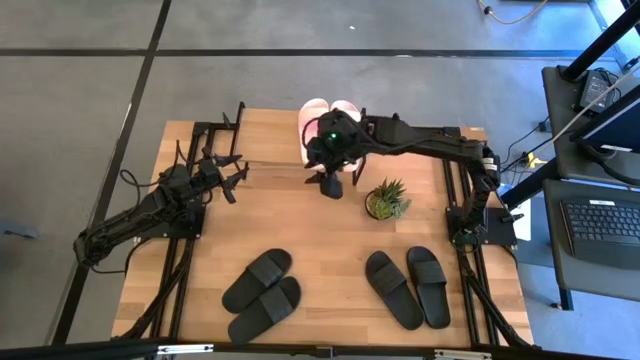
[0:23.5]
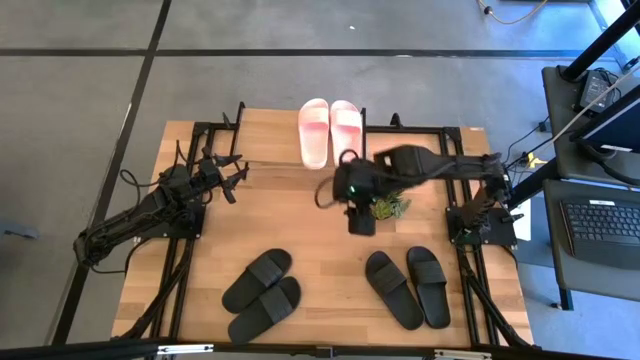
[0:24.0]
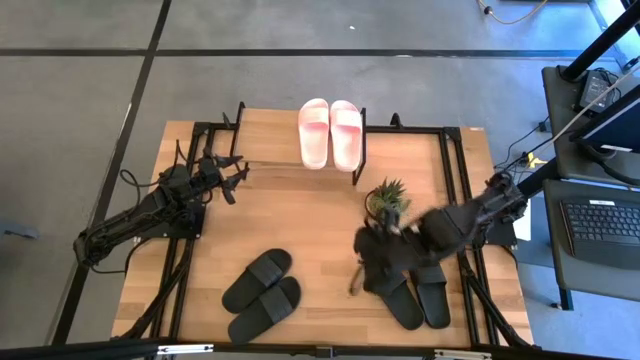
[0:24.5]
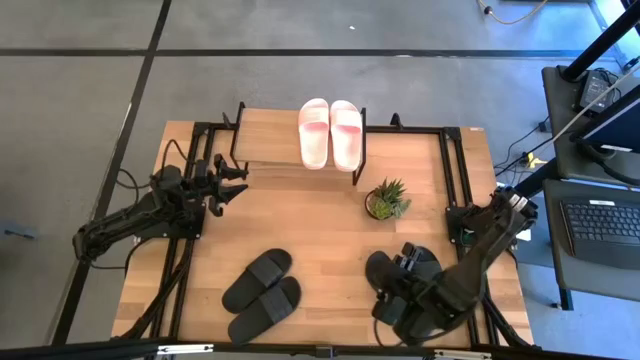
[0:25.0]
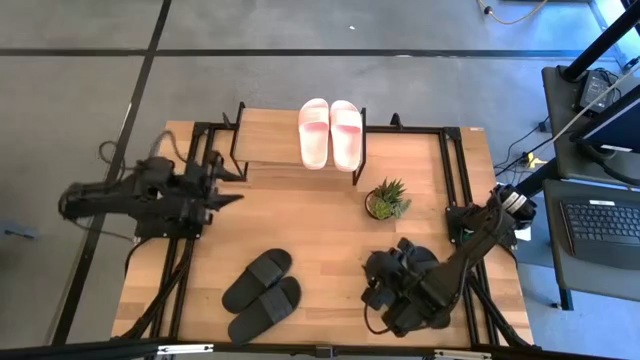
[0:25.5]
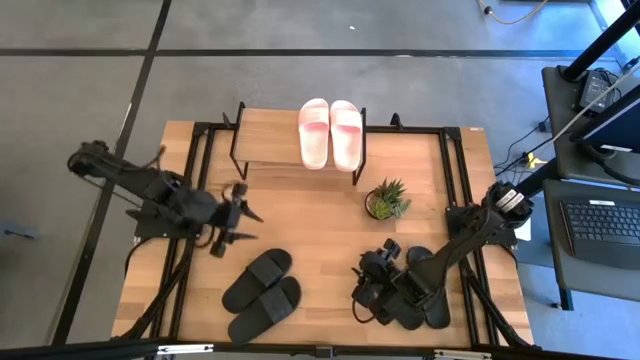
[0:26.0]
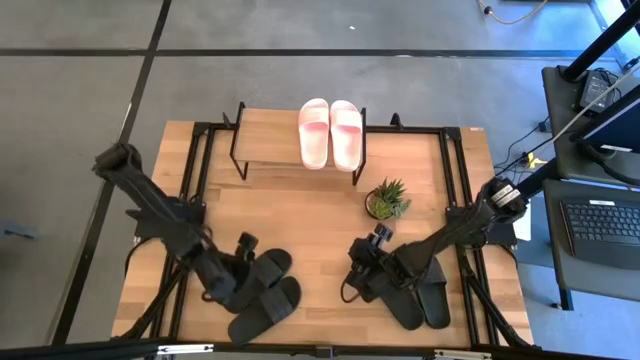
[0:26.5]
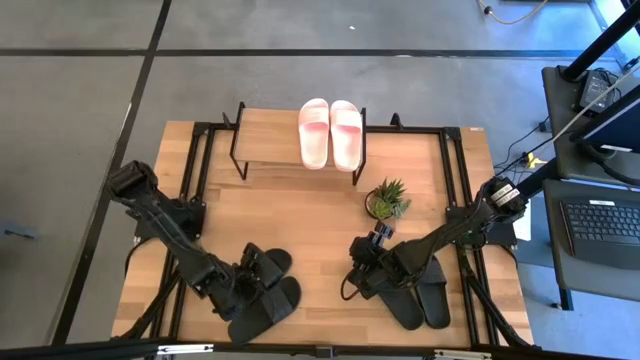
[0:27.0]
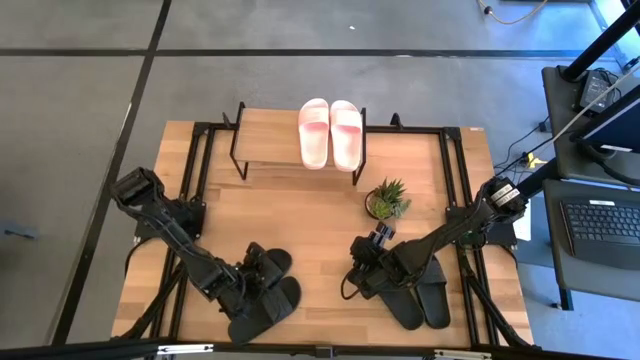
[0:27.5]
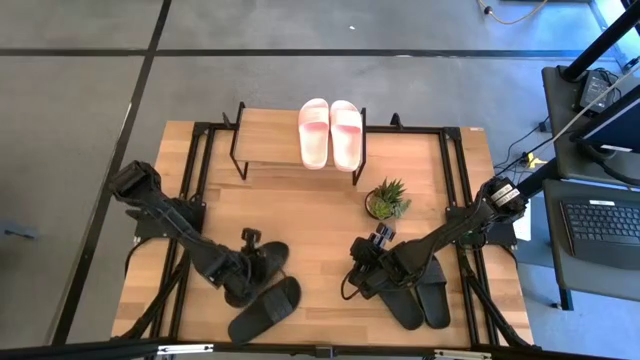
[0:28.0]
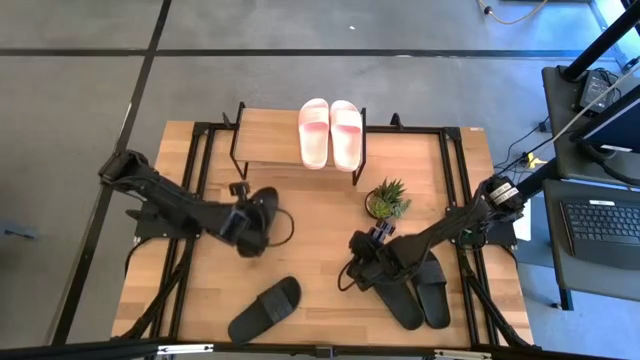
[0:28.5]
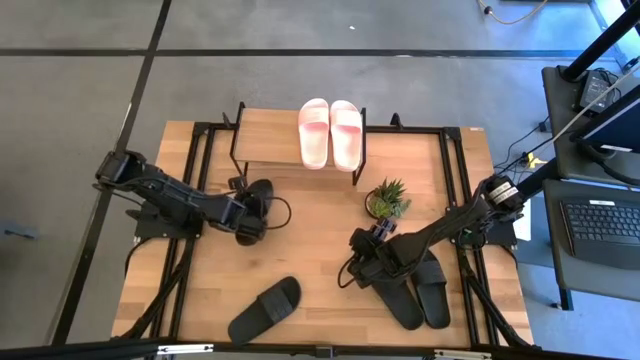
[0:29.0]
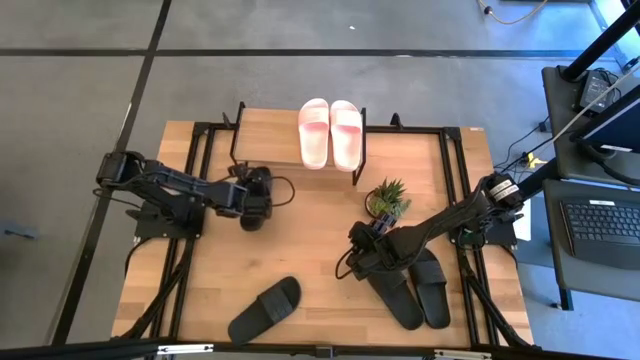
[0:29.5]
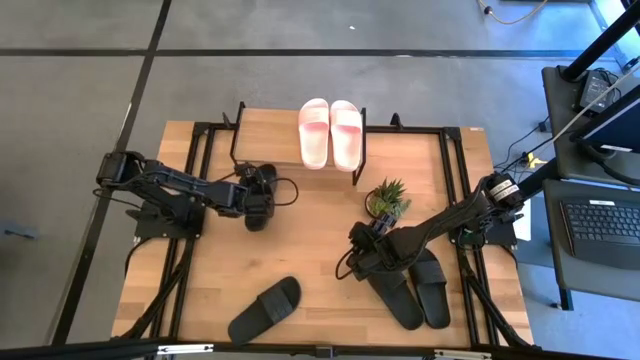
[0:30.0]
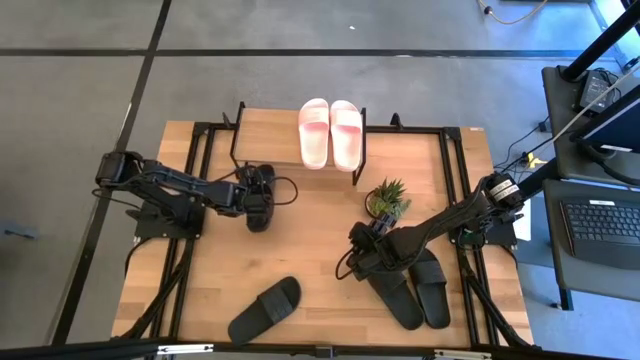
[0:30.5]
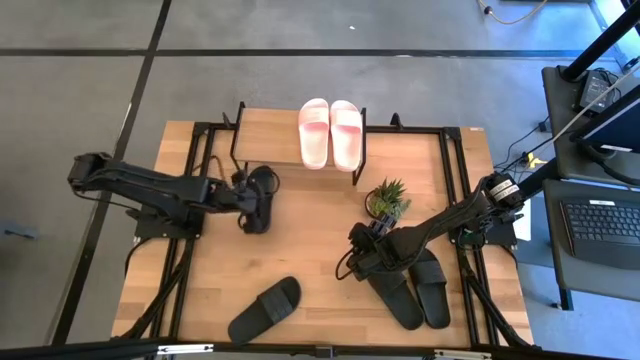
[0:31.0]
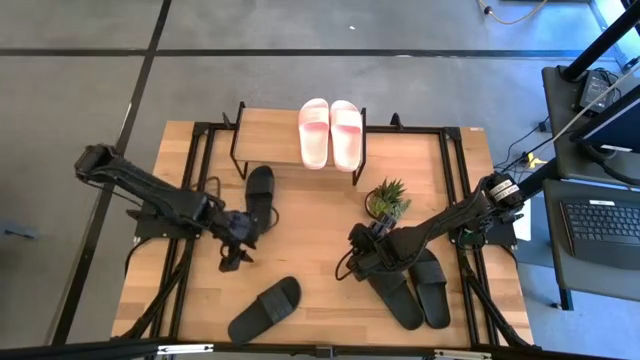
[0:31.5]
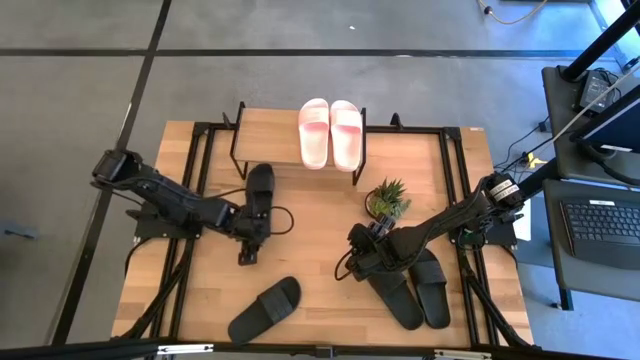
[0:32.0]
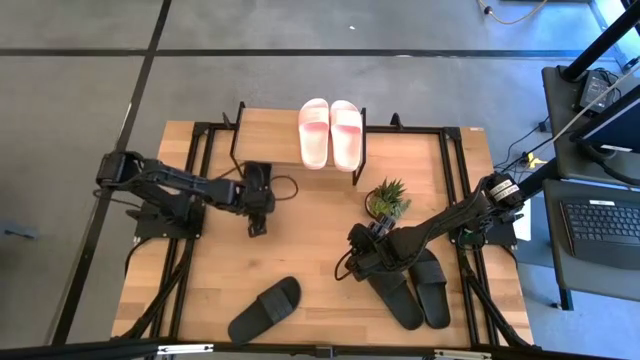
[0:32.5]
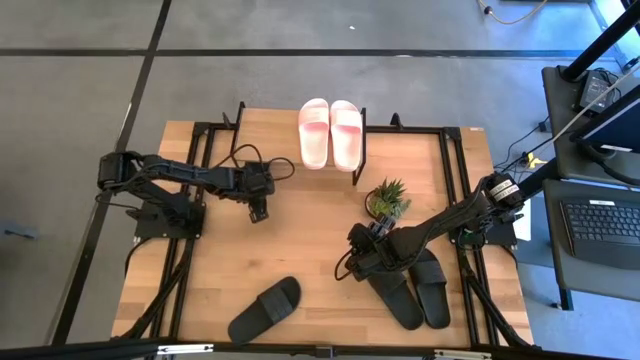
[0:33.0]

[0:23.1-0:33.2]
Task: Pick and place slides into the shelf
Put the black slide under the shelf

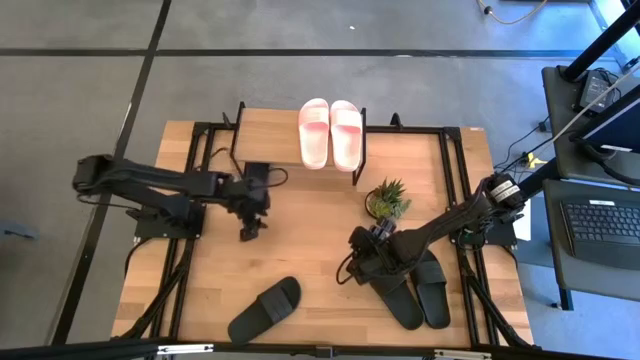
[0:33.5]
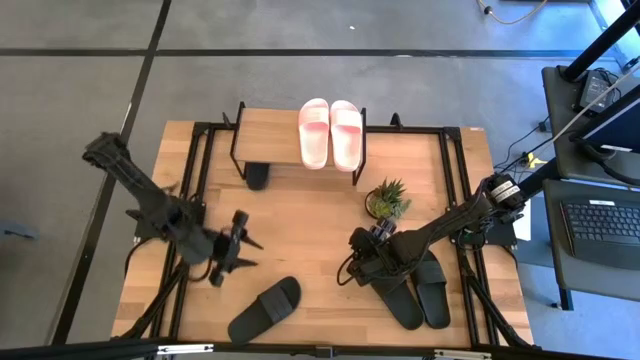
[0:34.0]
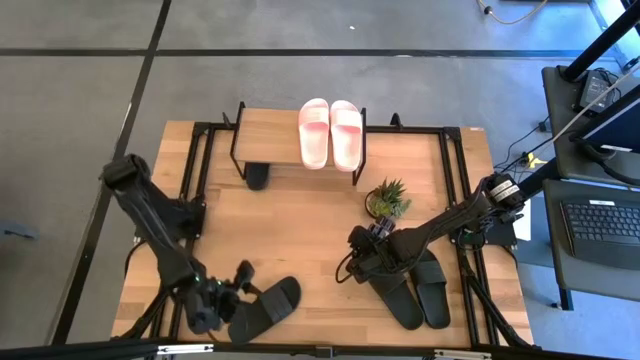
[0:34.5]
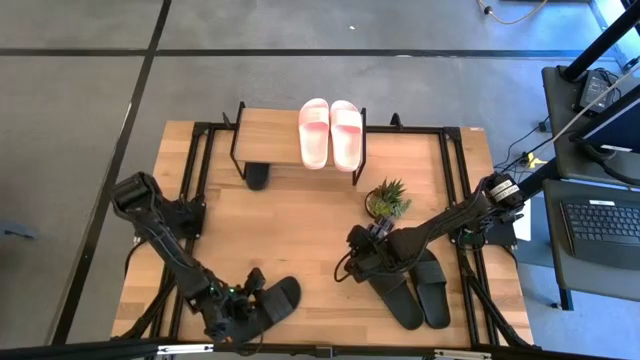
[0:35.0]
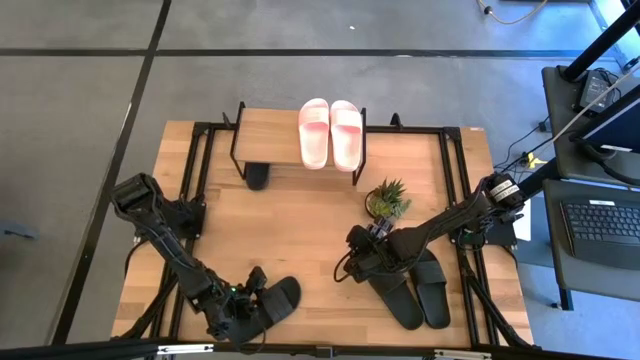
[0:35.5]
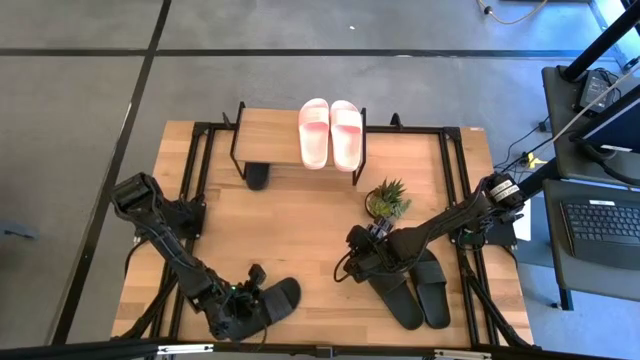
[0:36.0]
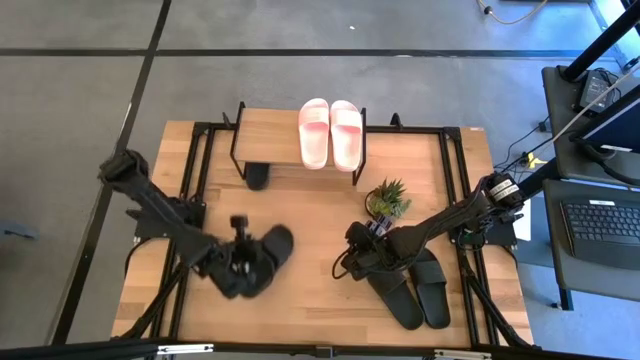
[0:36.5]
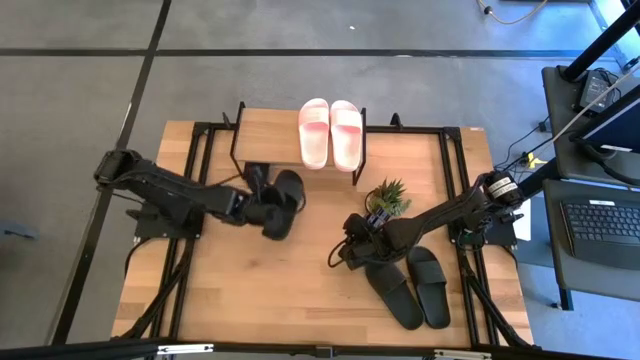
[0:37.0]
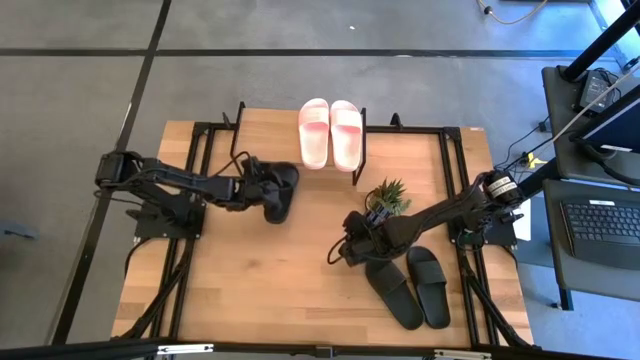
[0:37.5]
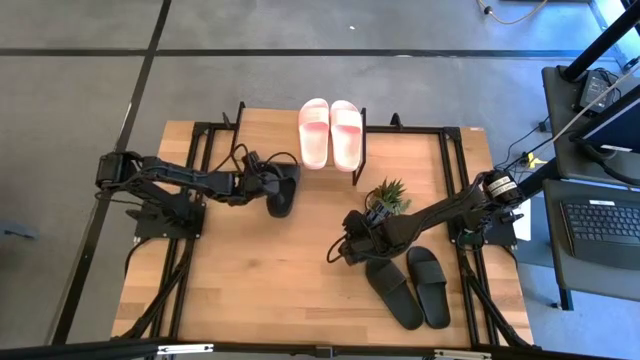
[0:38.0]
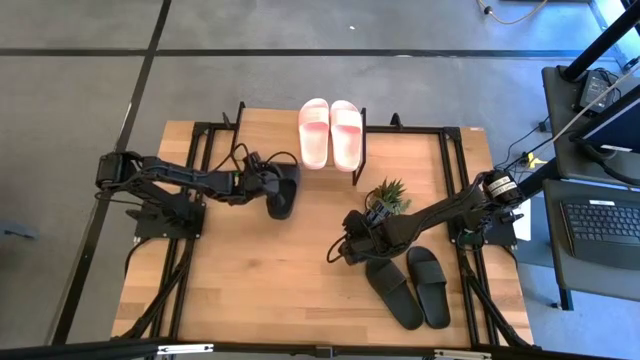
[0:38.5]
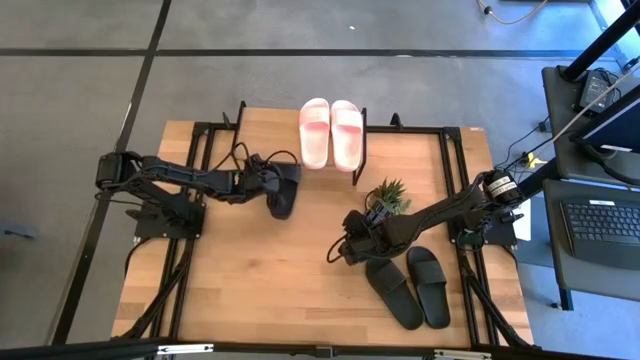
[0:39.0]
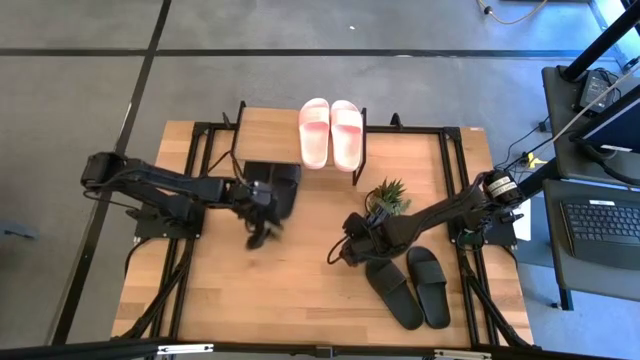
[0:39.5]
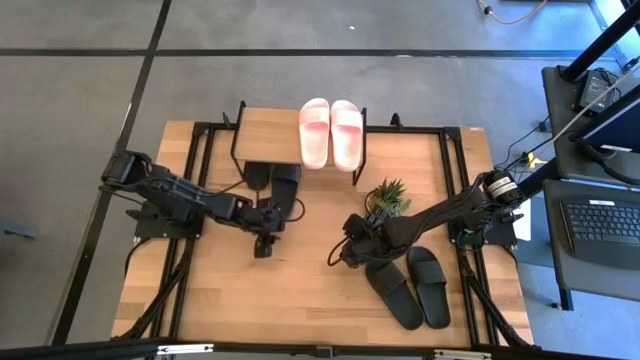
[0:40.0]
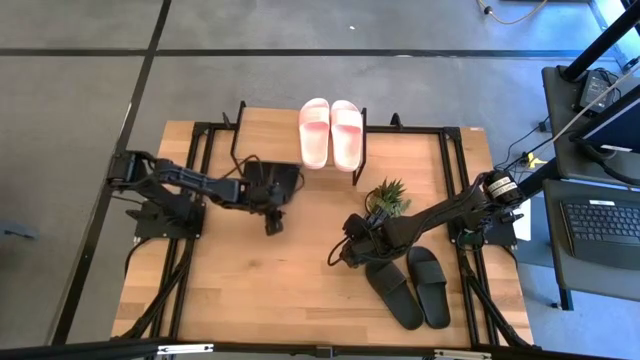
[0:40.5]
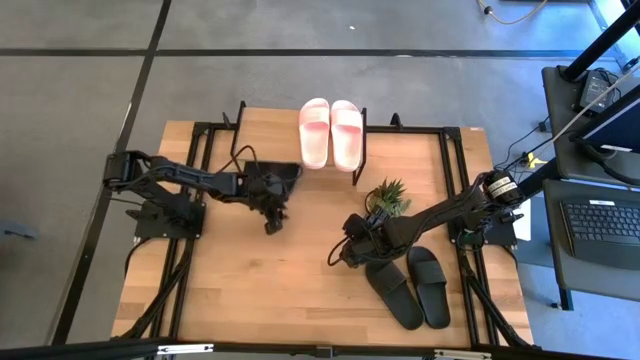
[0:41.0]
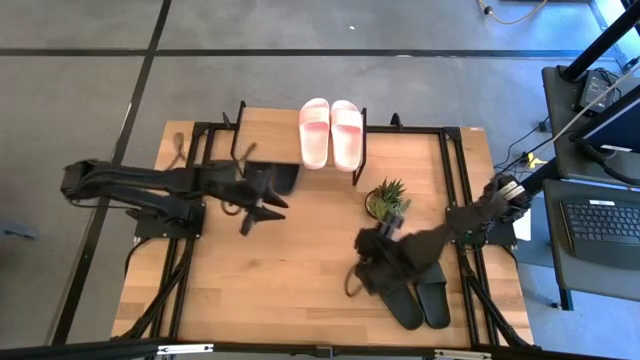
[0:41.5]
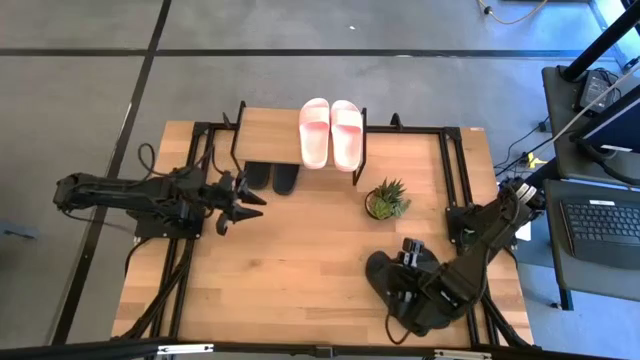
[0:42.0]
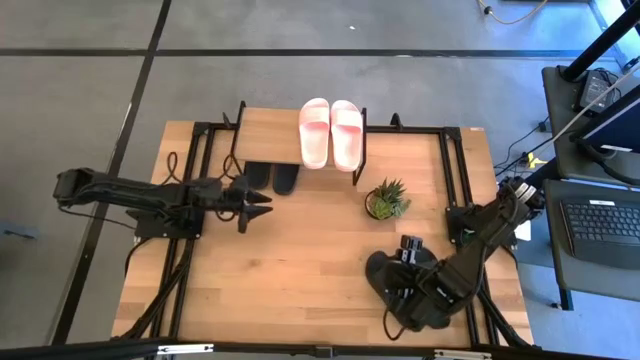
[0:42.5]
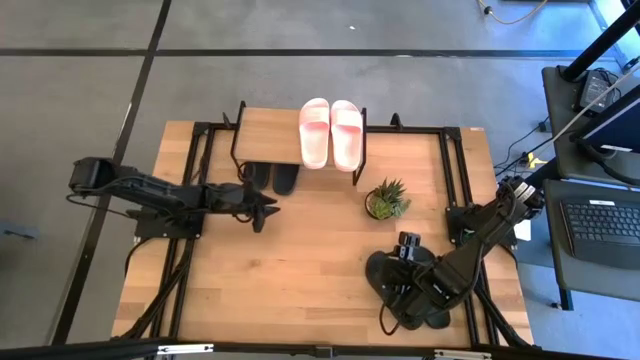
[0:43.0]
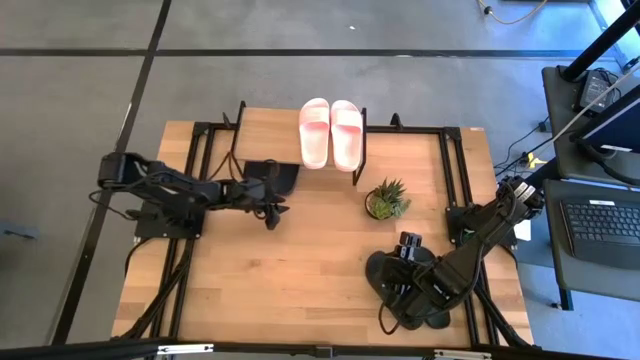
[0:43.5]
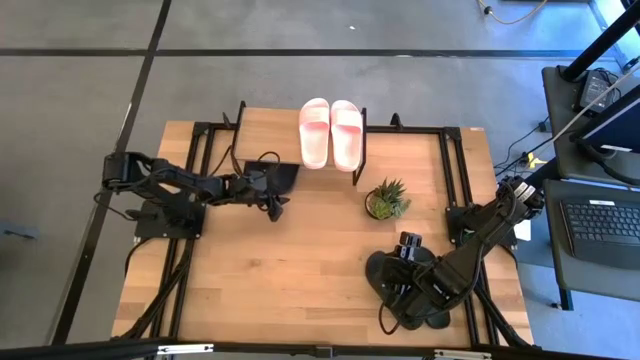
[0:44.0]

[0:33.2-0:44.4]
Put the black slide under the shelf
